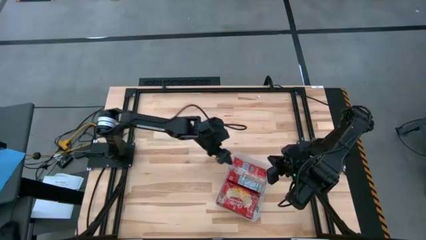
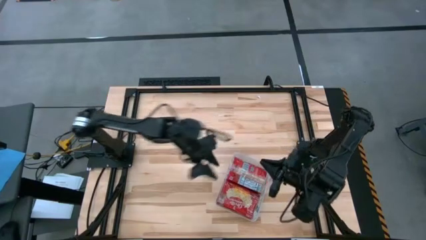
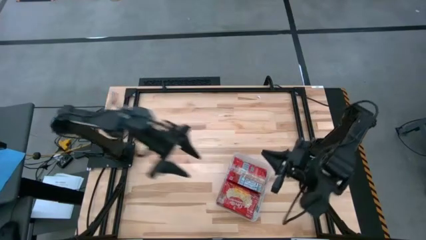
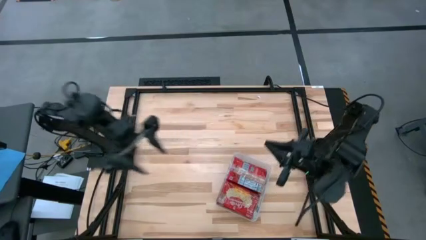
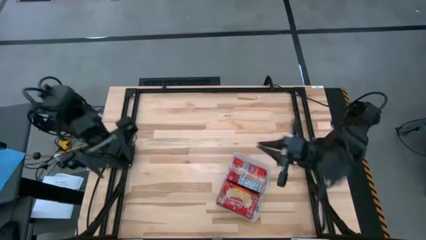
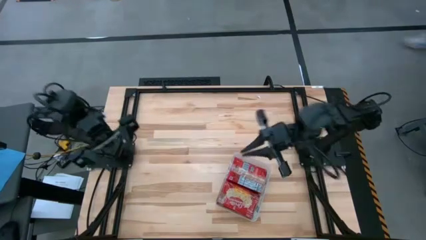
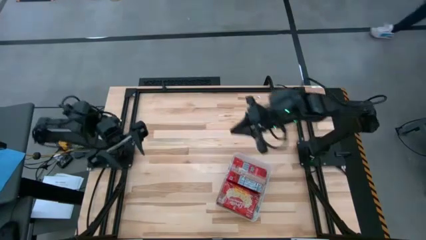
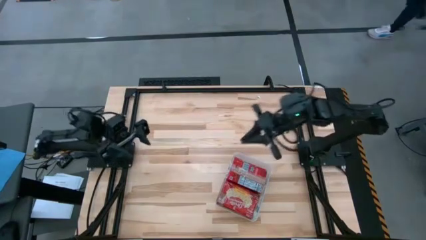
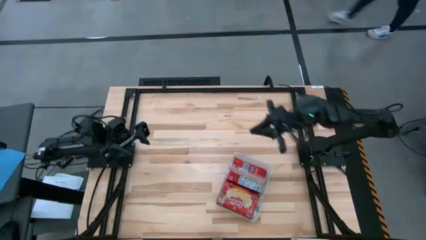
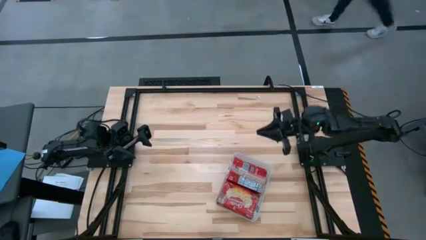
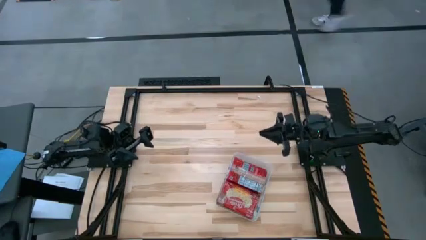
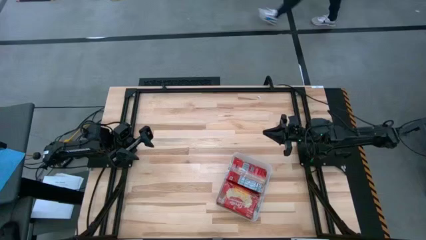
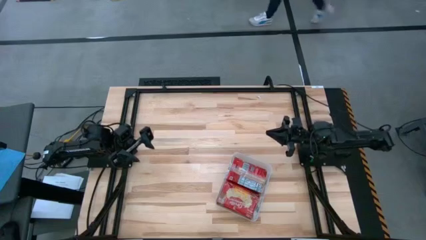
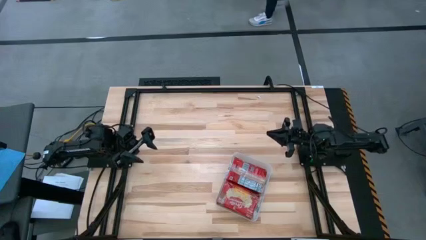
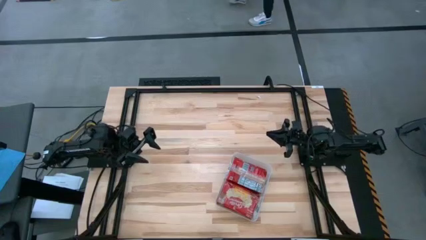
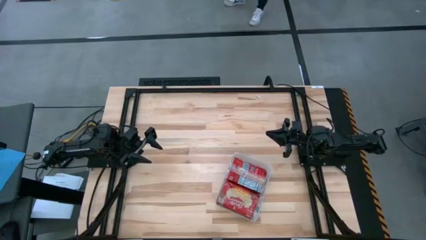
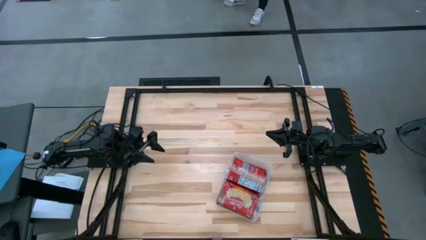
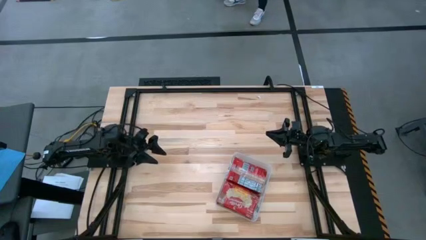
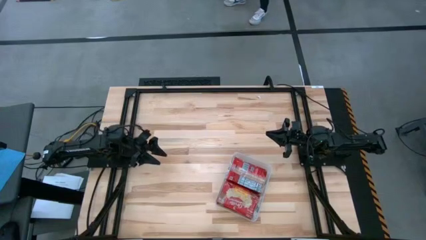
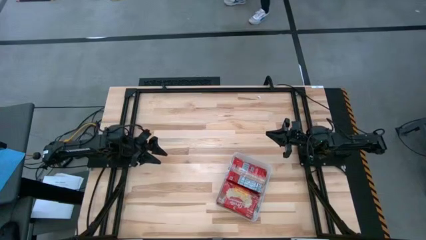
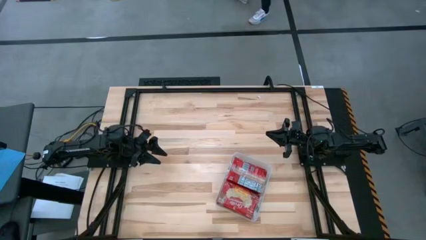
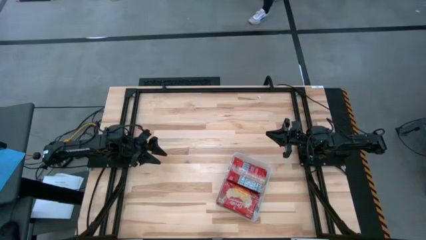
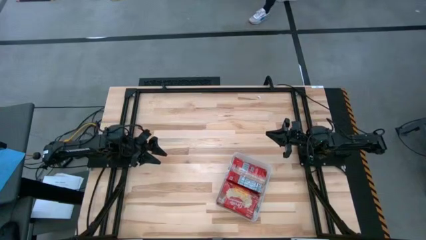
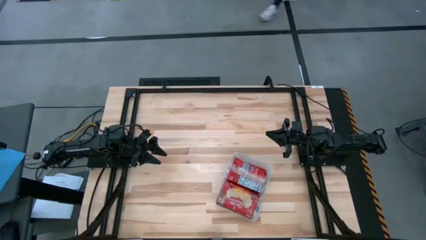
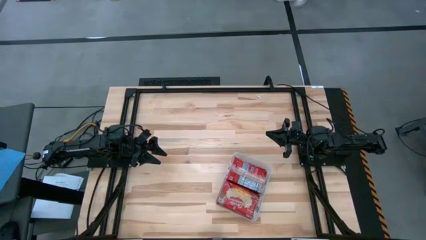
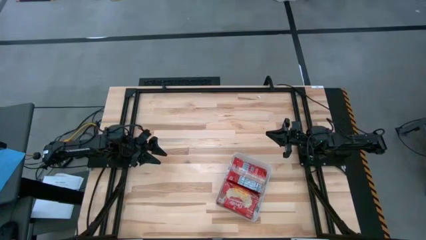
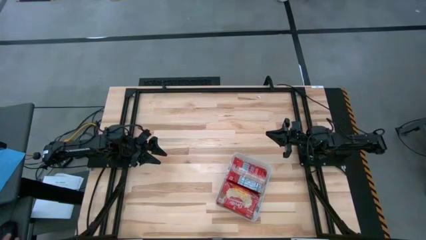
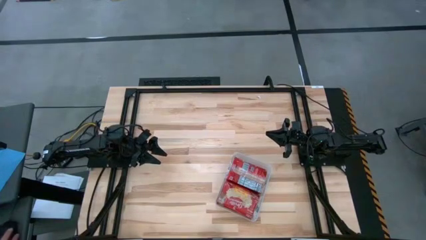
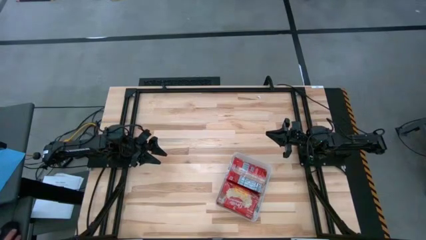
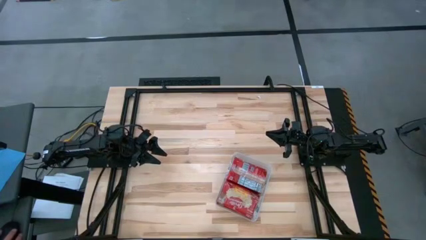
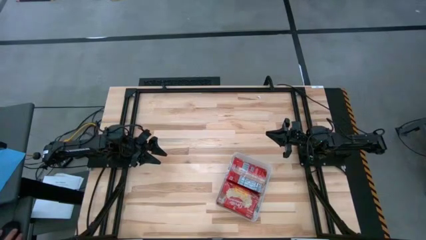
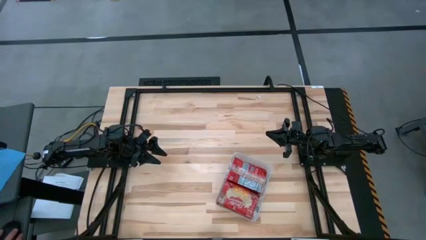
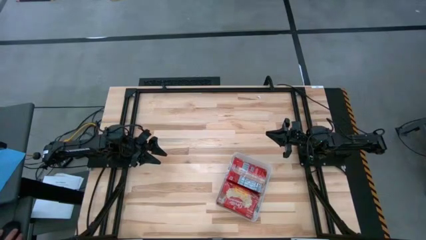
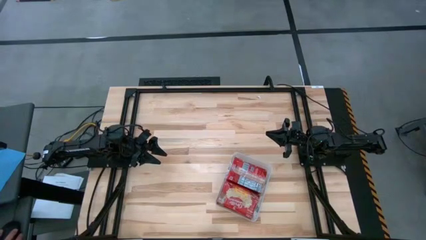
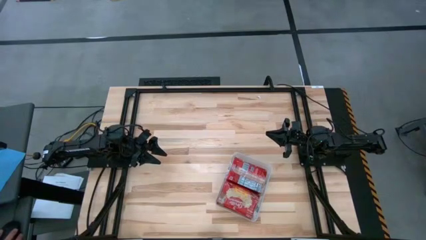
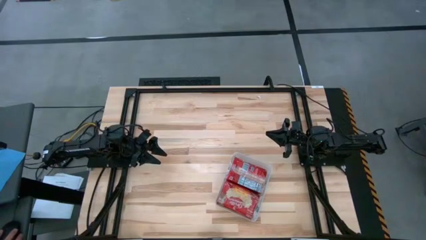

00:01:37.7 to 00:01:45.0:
Task: Sort popcorn bags into baskets
Return to Home Position

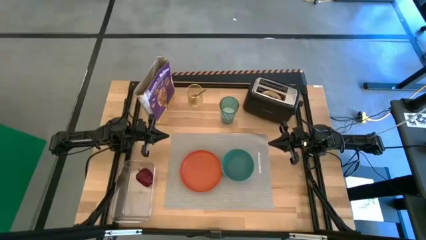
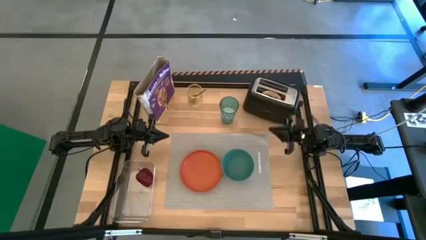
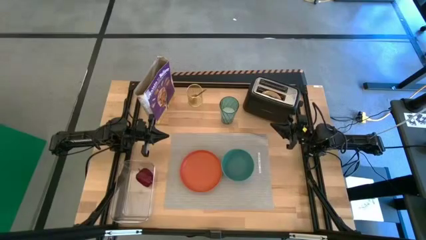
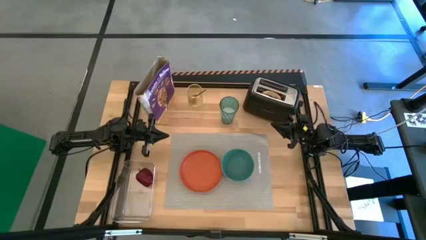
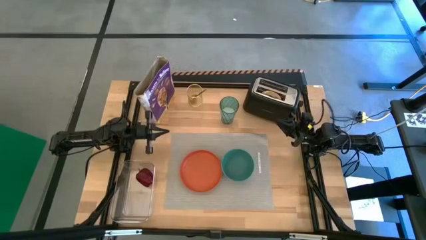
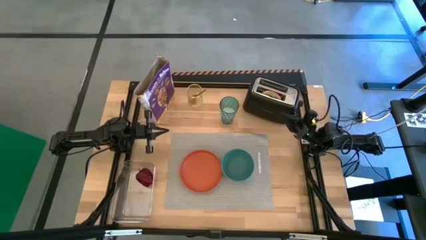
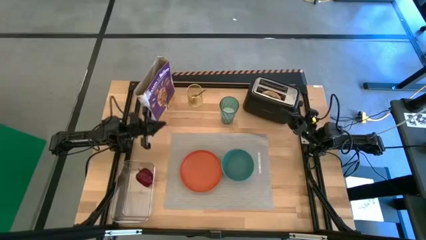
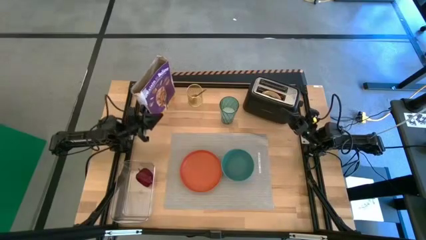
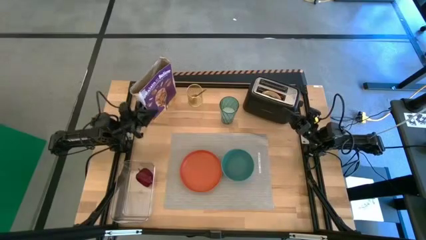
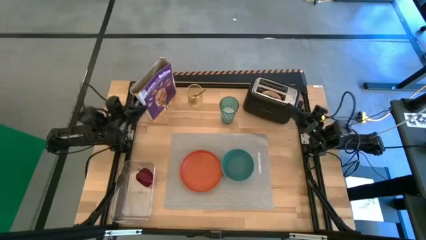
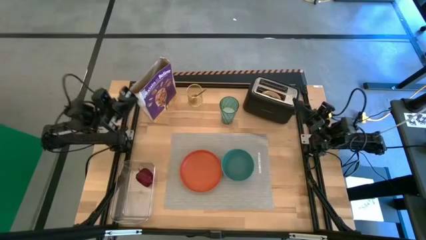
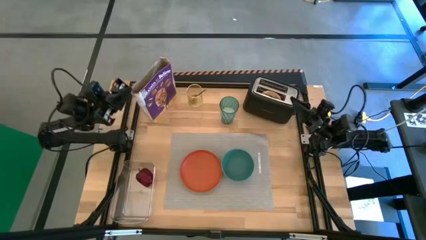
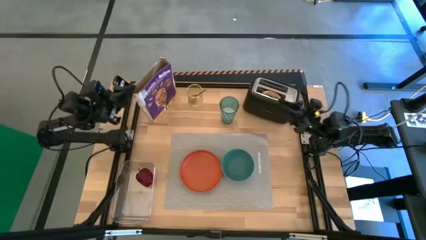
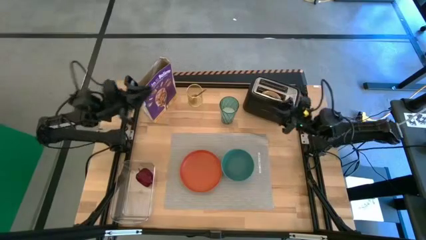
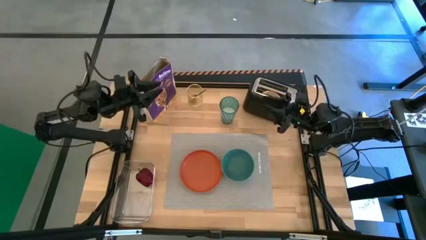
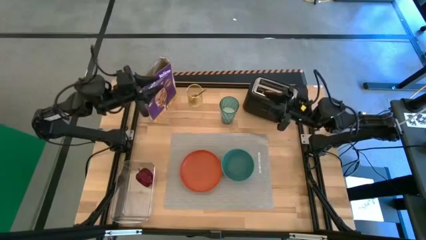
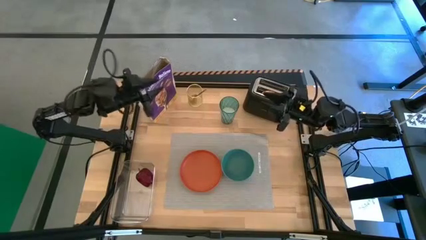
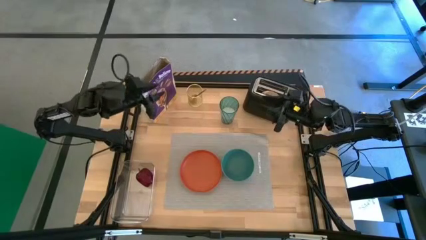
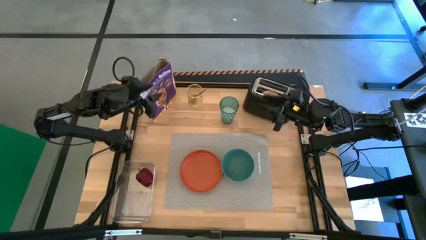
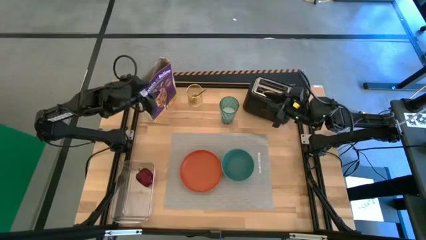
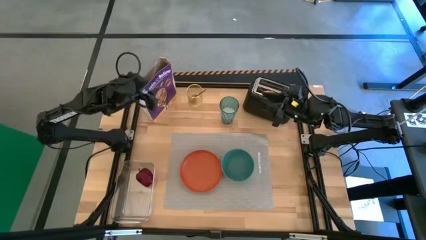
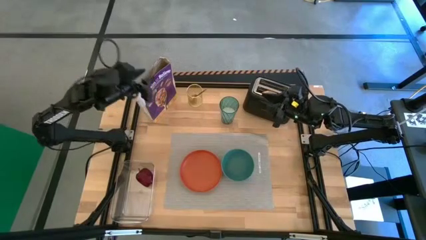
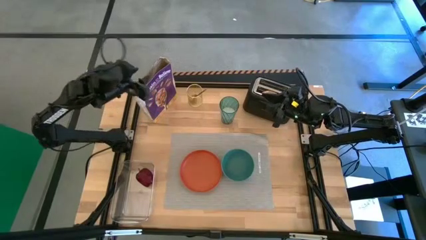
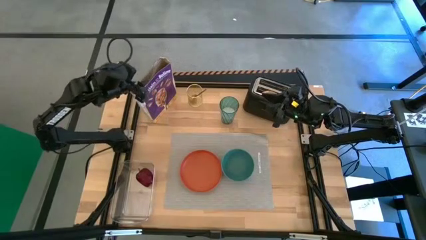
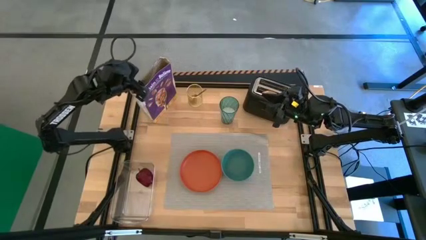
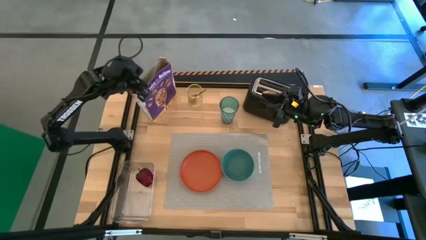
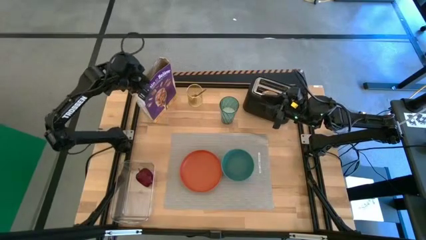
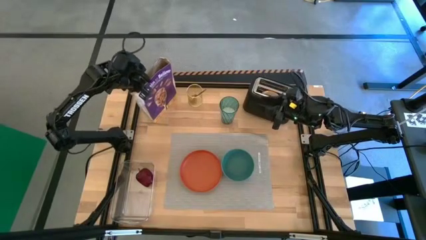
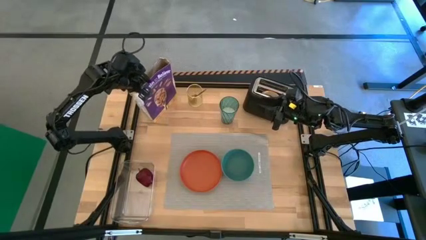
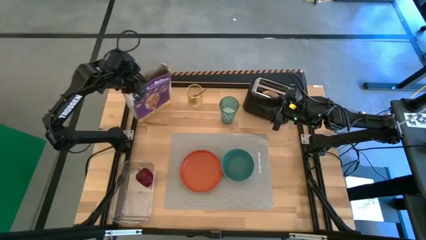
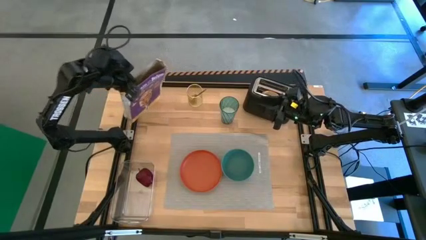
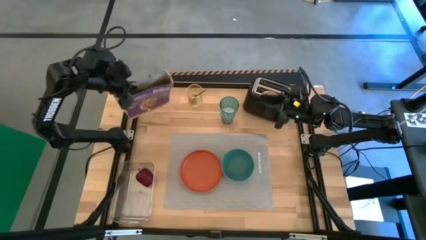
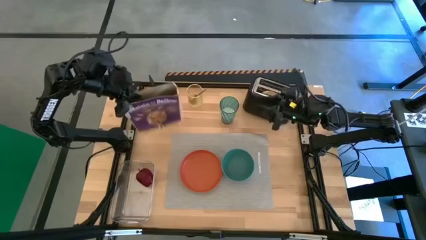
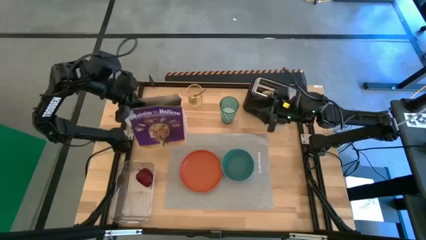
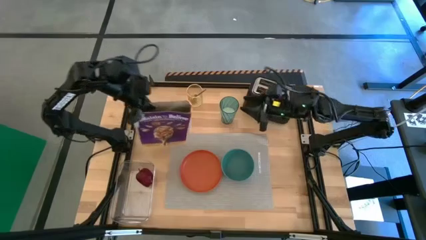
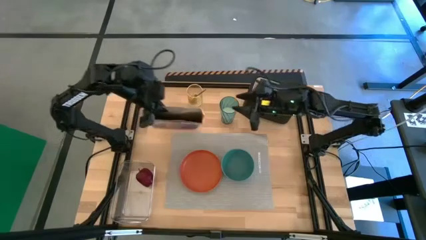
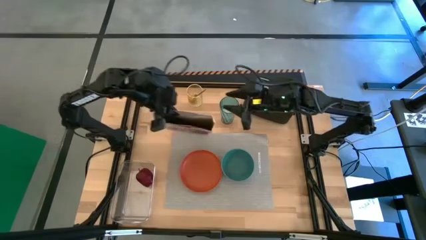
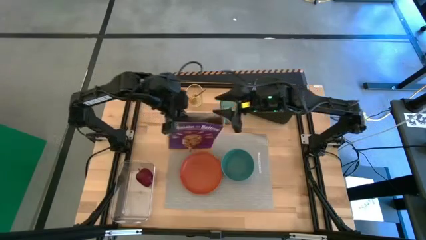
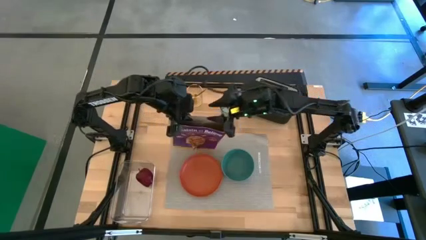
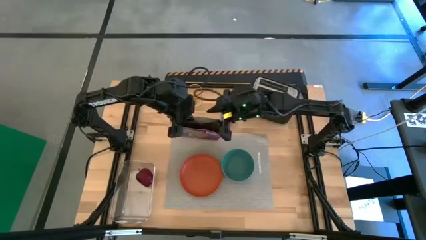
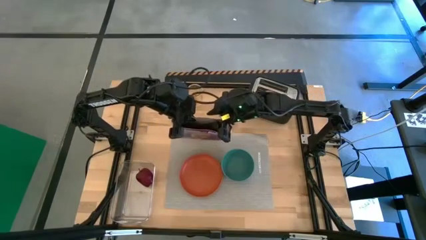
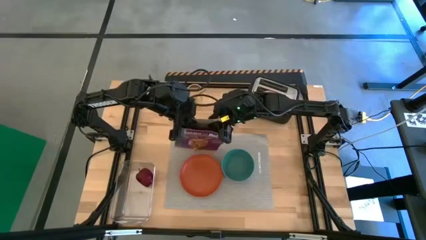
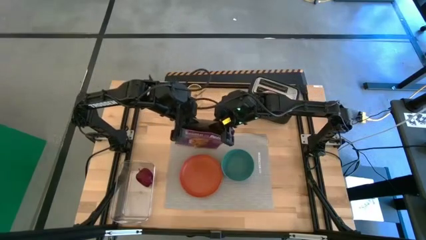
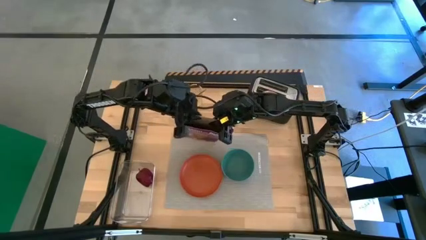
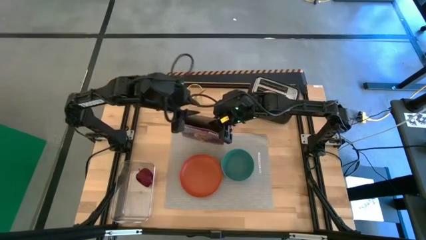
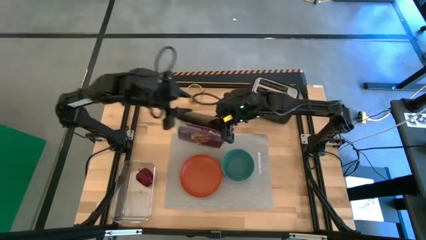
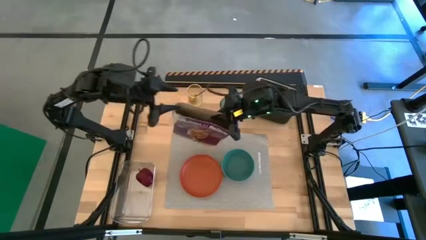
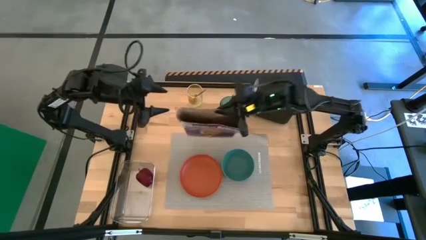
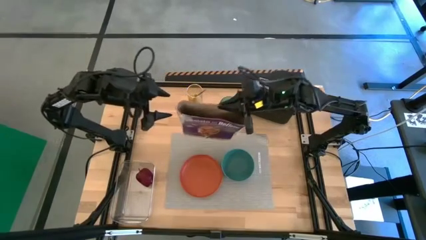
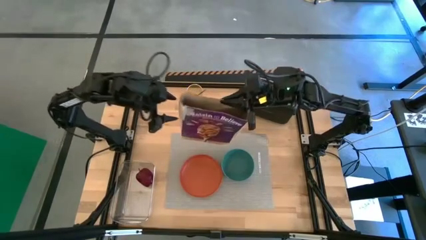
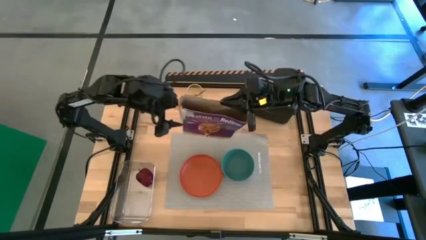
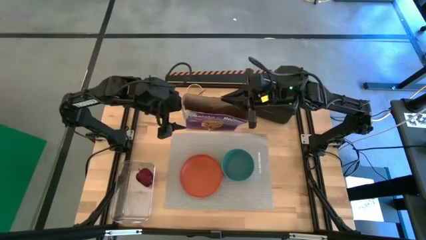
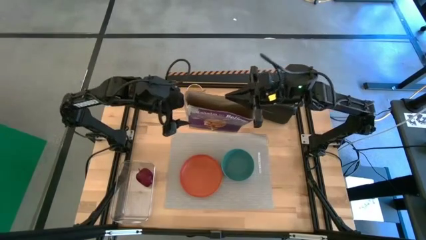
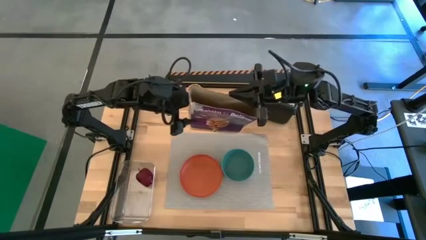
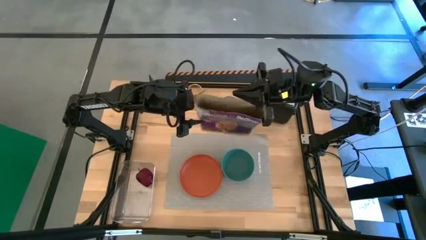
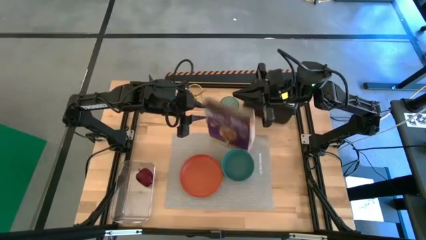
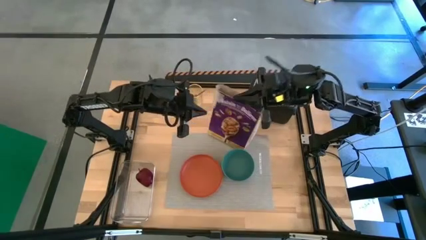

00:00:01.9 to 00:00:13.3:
Task: Arrange a breakfast setting
Pour the cereal into the blue bowl from the cereal box
